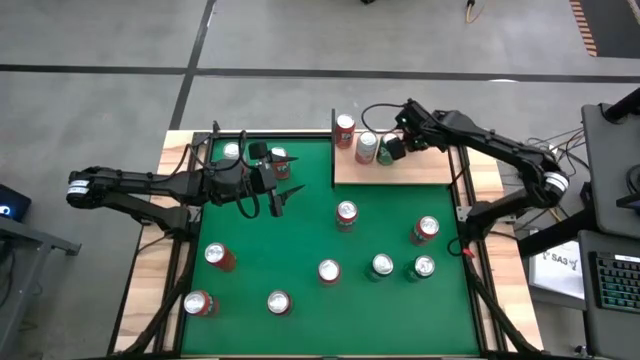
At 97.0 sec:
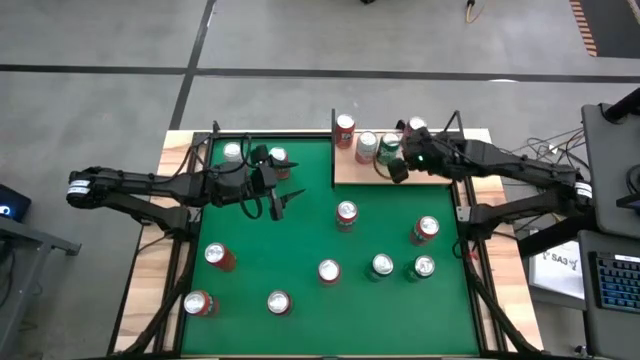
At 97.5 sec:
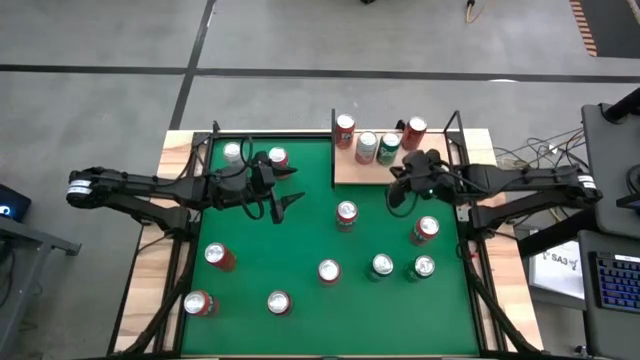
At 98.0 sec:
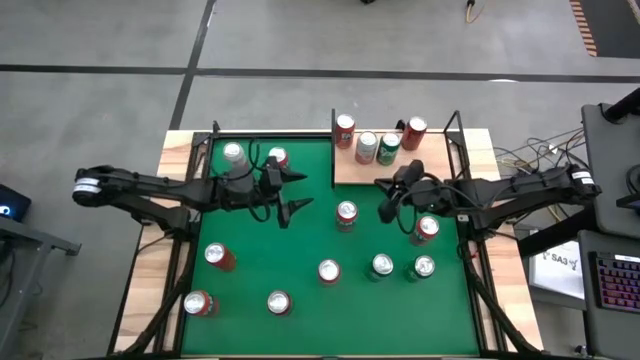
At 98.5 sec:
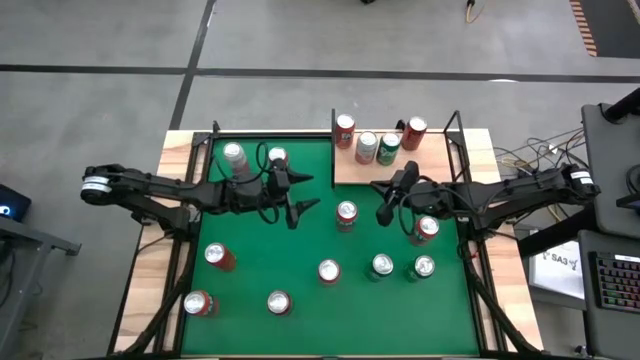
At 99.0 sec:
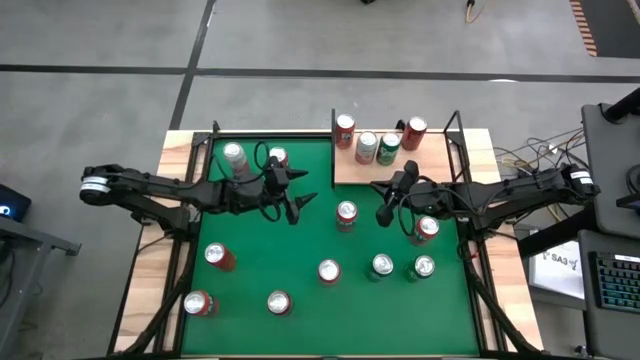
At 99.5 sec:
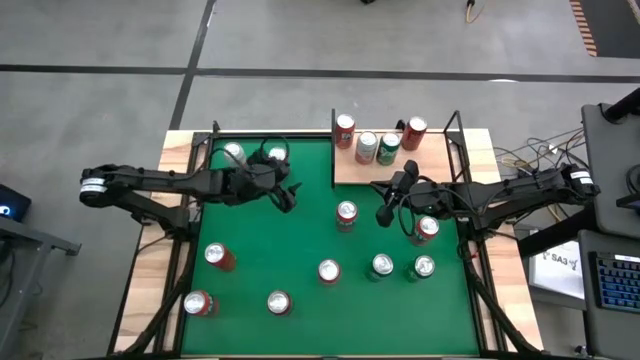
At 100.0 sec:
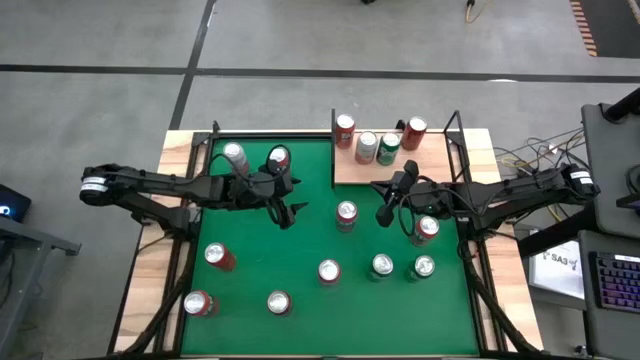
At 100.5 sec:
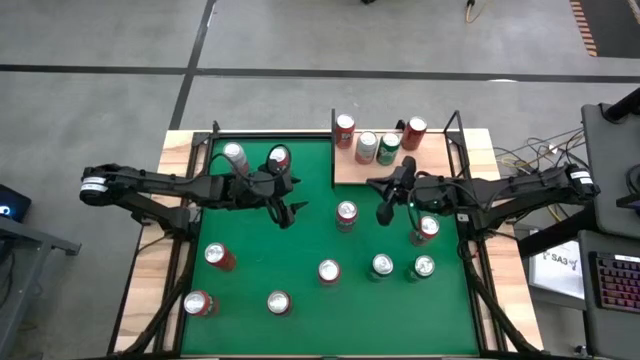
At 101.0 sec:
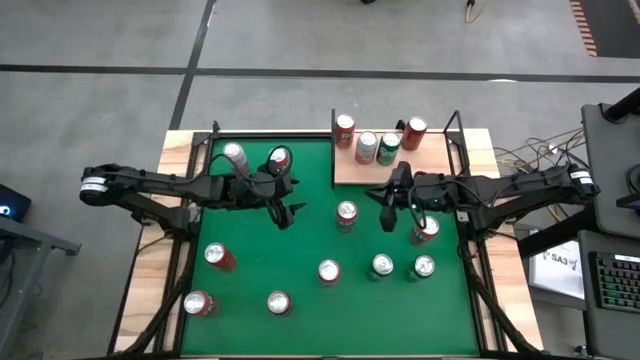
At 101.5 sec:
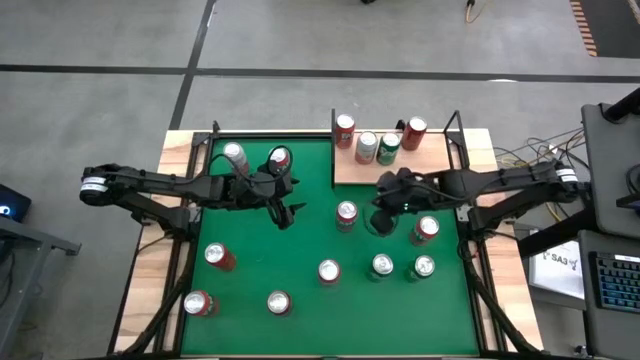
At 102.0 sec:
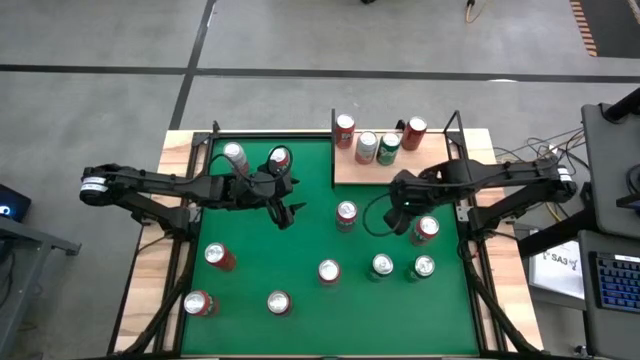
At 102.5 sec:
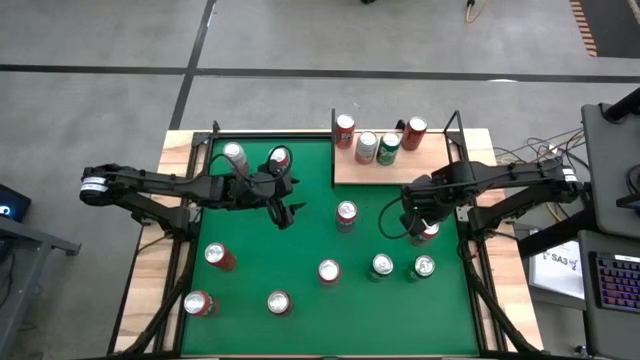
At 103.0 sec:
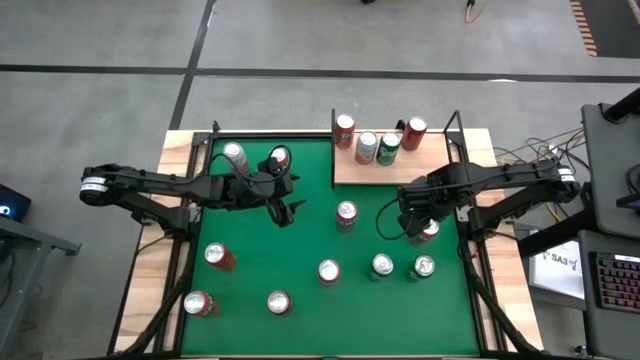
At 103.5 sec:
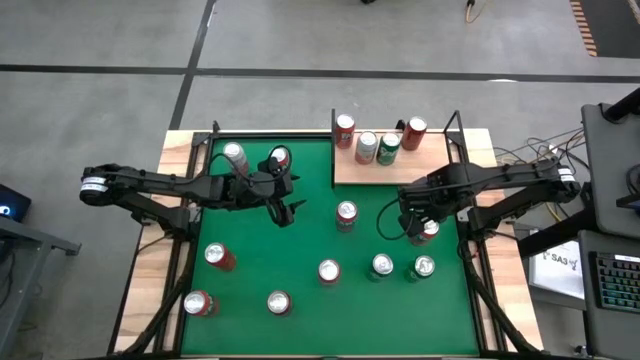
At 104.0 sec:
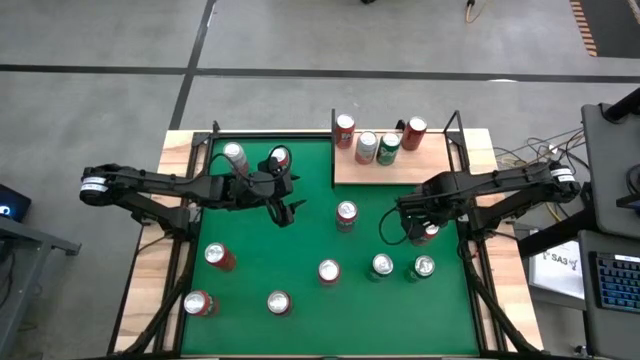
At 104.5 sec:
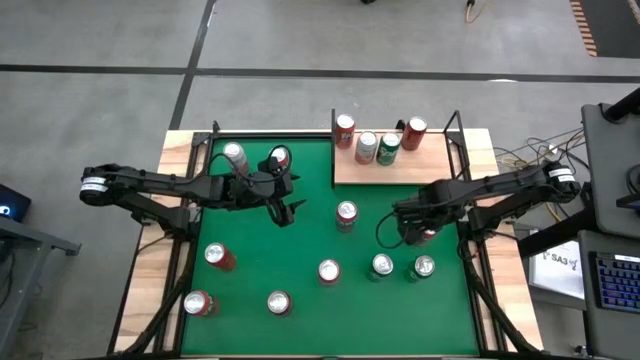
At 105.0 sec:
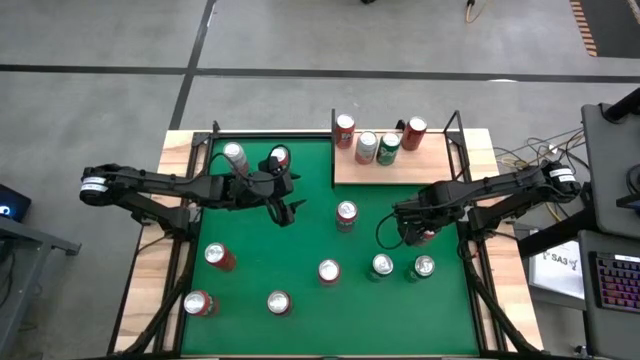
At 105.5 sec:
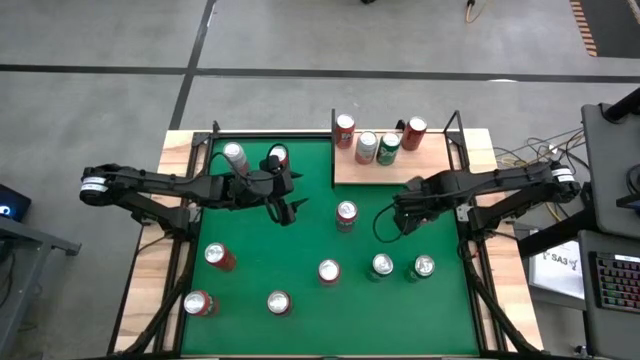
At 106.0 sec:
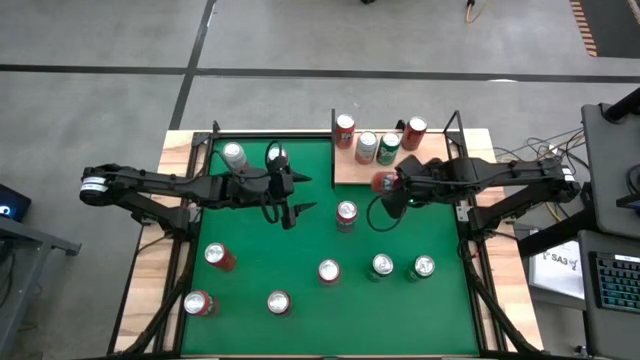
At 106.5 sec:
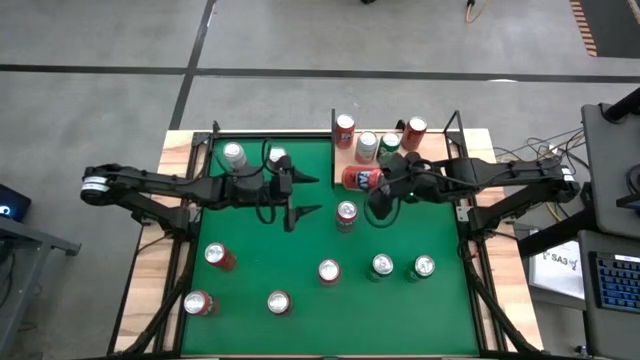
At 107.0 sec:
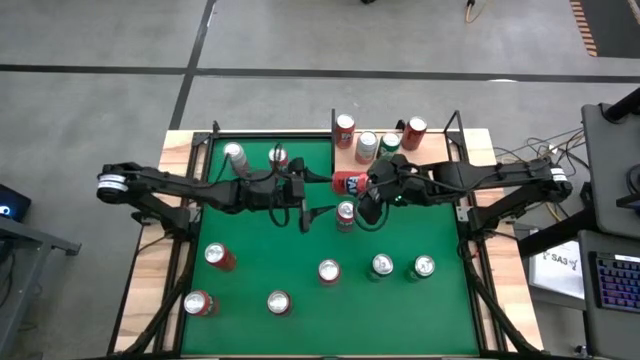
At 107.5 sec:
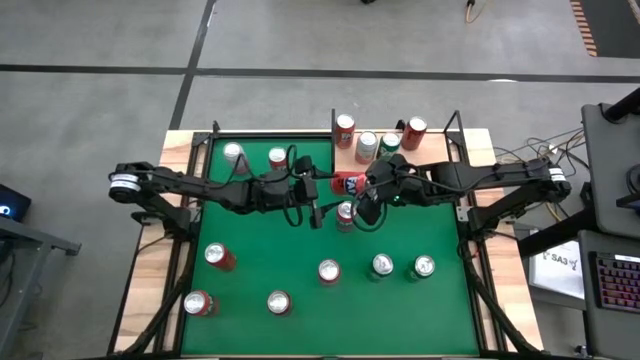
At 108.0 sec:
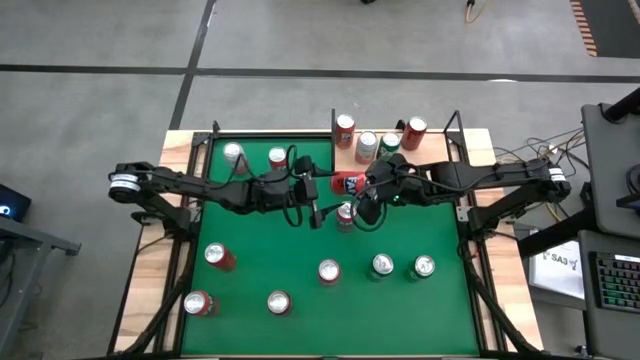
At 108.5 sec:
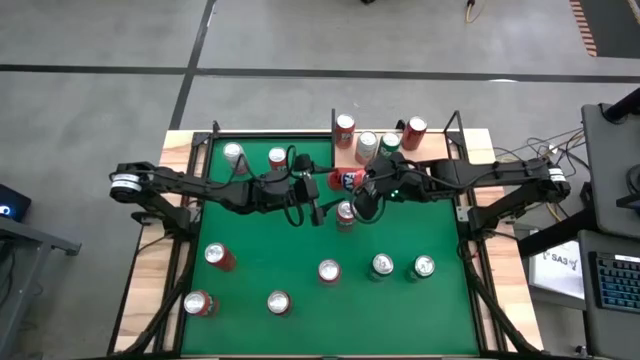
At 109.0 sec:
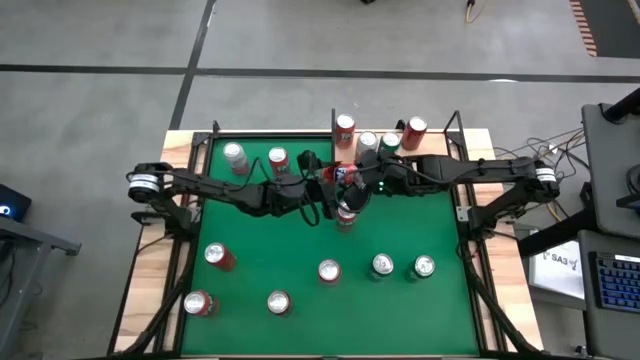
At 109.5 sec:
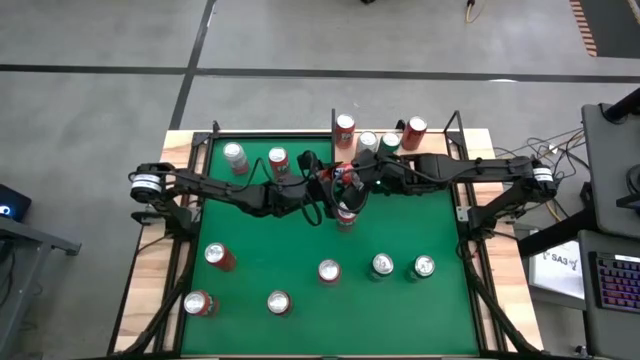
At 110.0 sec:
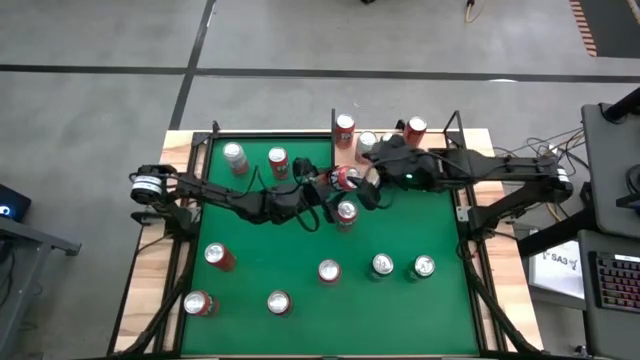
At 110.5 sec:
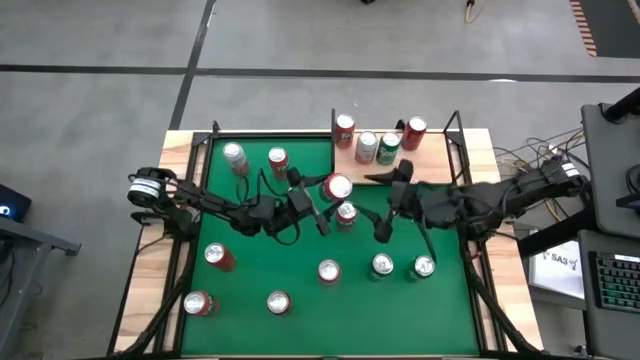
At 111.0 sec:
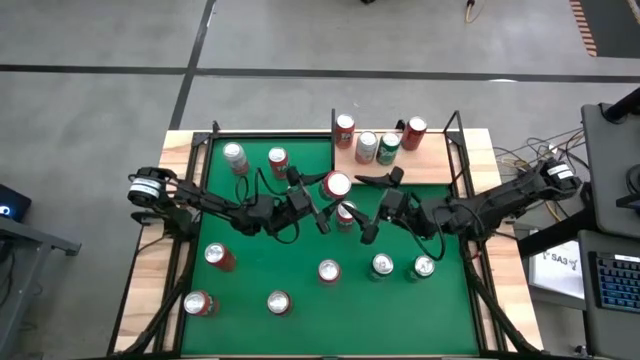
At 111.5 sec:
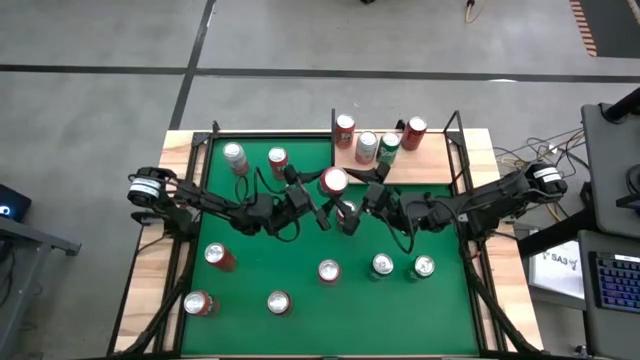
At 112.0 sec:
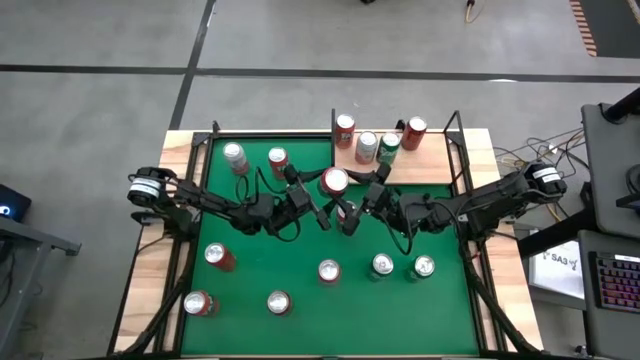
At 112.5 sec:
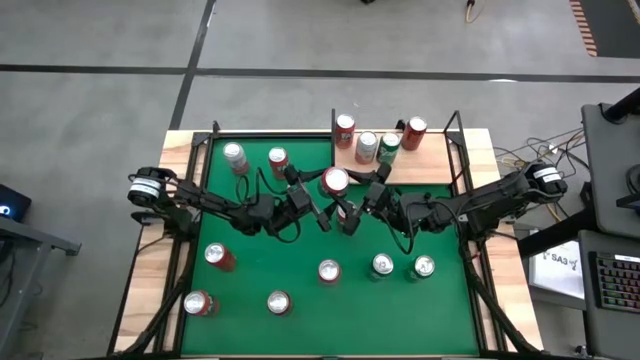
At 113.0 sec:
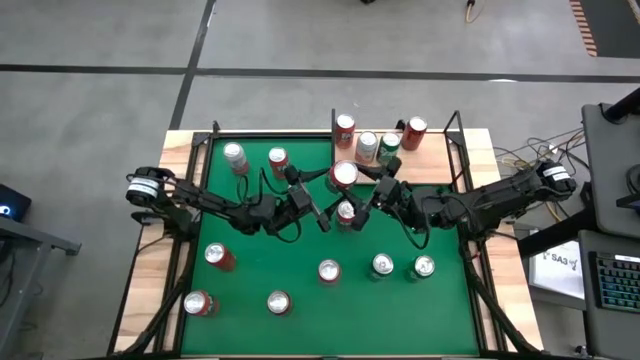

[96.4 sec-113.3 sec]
Task: Place canned beverage on shelf
Put the red soda can on the shelf aligned with the other red soda can
